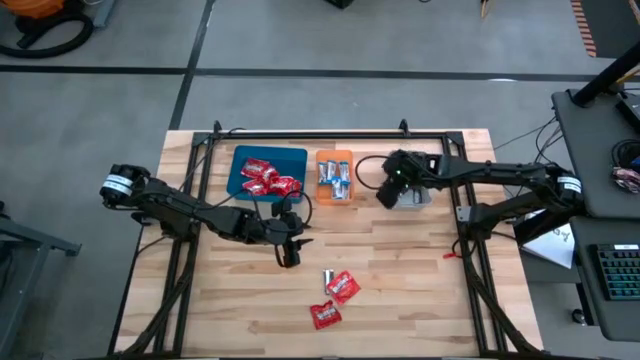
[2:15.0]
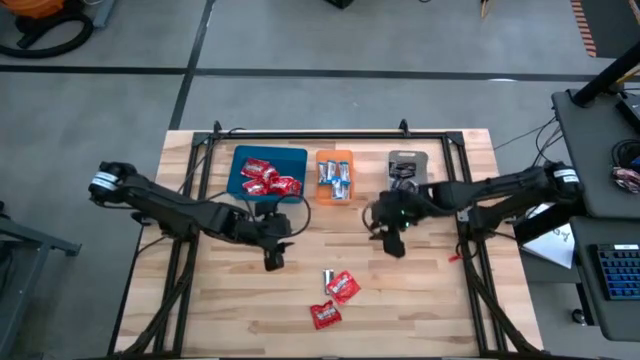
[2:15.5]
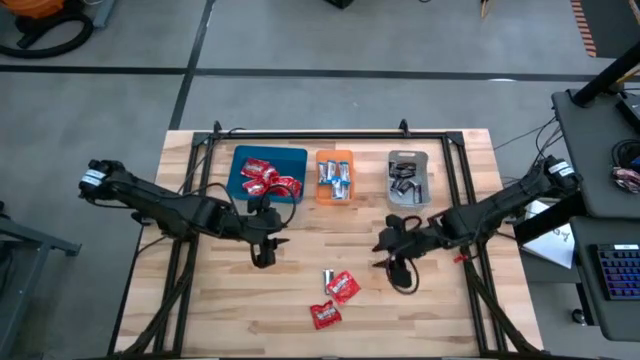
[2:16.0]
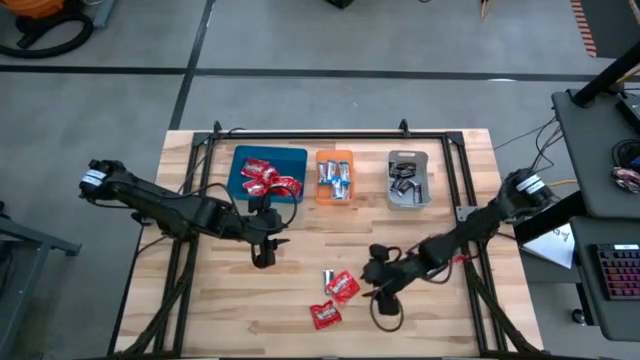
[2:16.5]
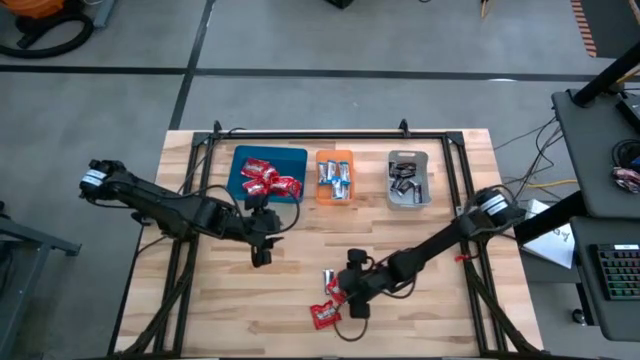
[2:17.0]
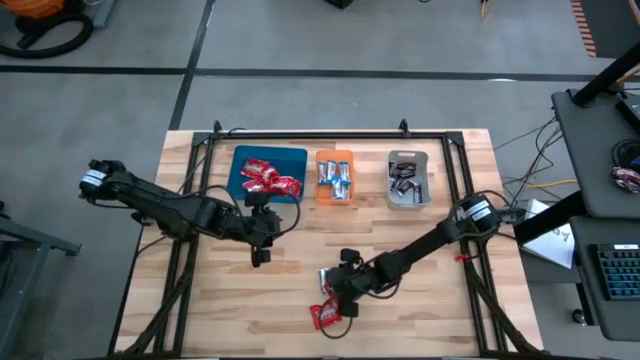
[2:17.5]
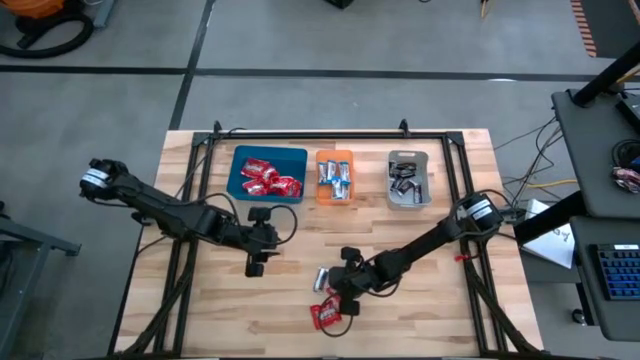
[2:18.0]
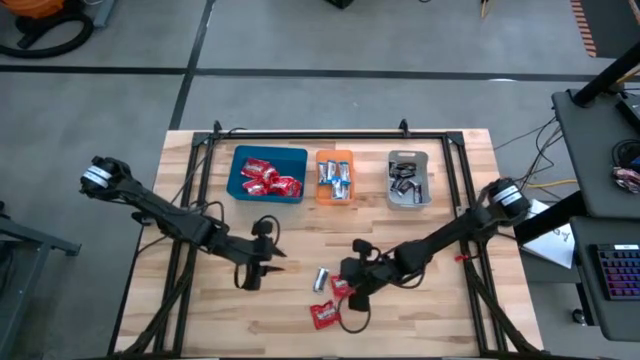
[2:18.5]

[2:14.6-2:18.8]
Task: Sort candy
Put the red candy into the blue bin

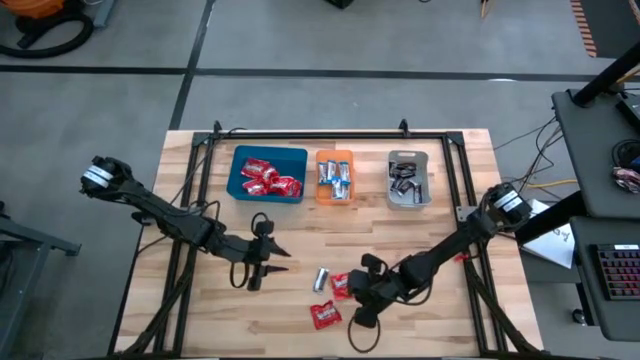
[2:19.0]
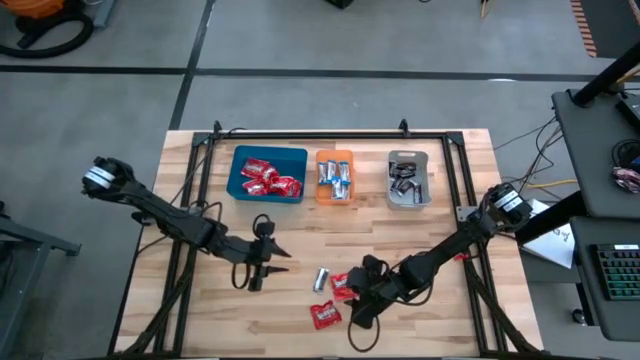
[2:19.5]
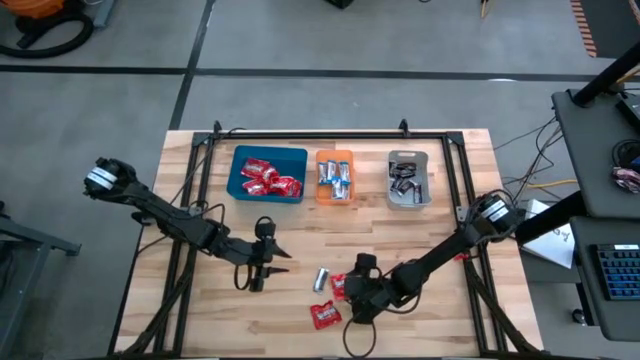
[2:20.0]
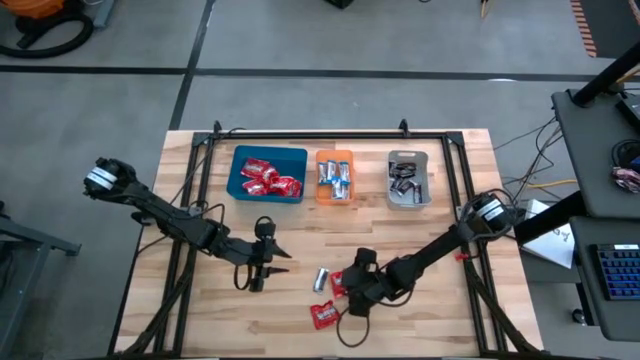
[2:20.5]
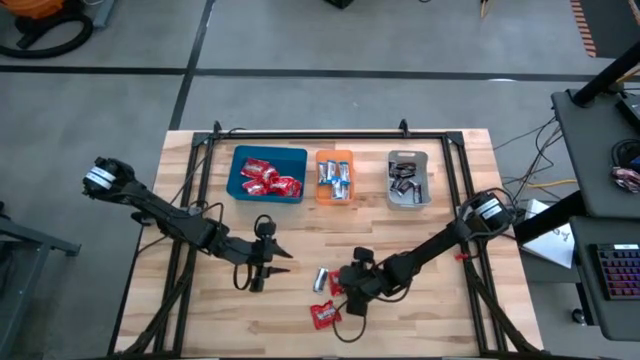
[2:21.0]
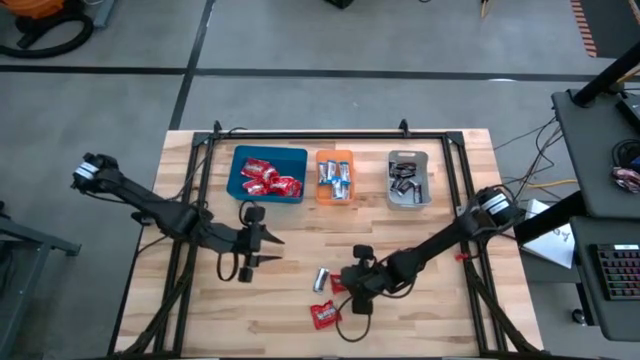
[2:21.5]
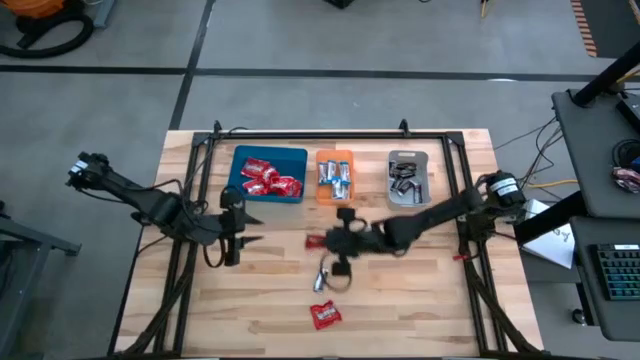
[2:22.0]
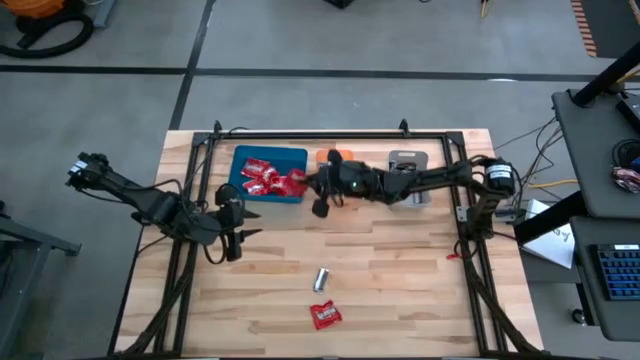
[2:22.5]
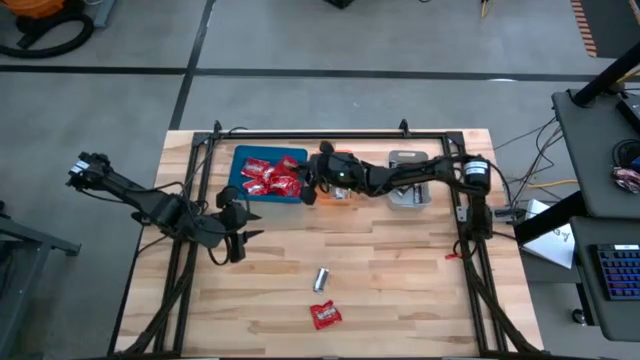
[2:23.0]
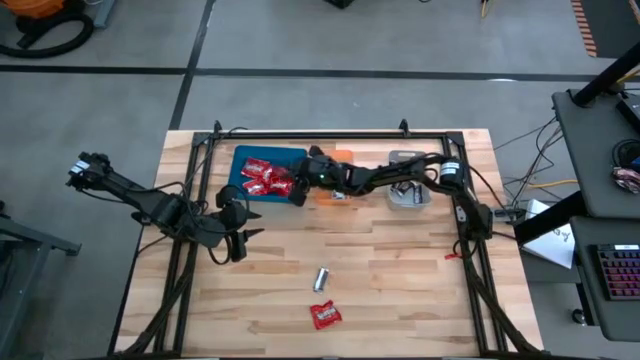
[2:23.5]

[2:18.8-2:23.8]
Put the red candy into the blue bin

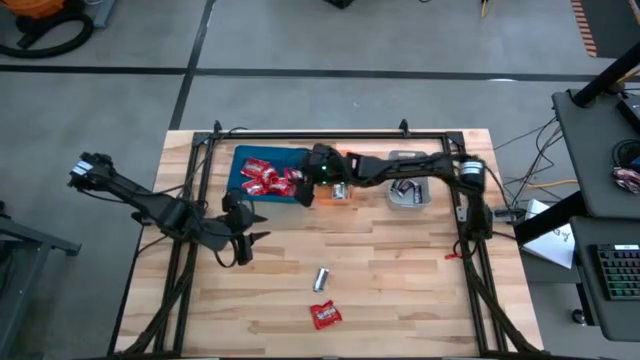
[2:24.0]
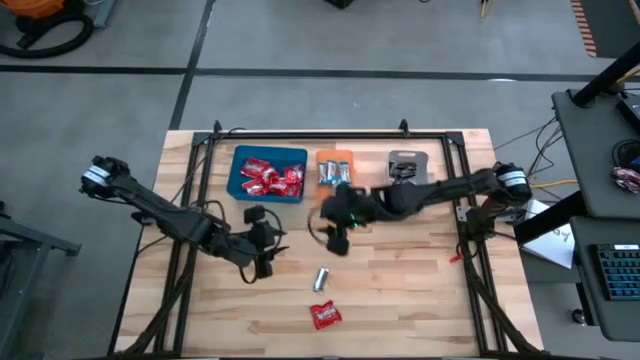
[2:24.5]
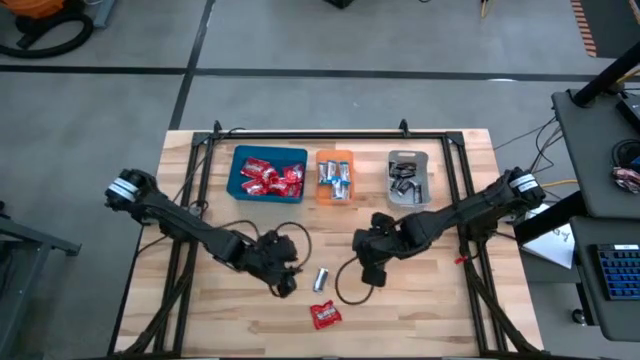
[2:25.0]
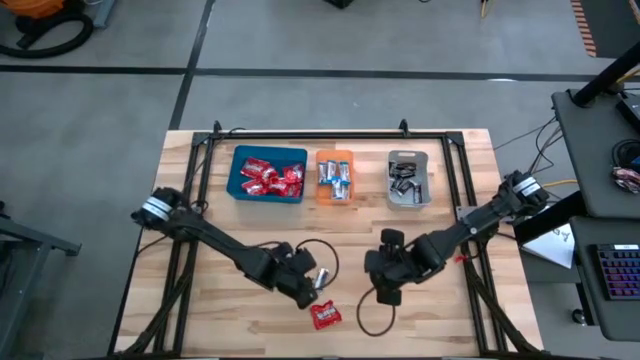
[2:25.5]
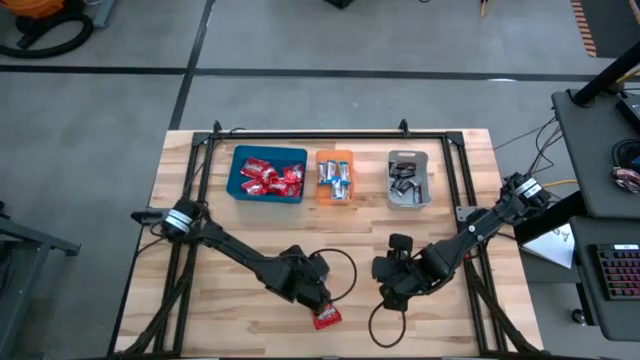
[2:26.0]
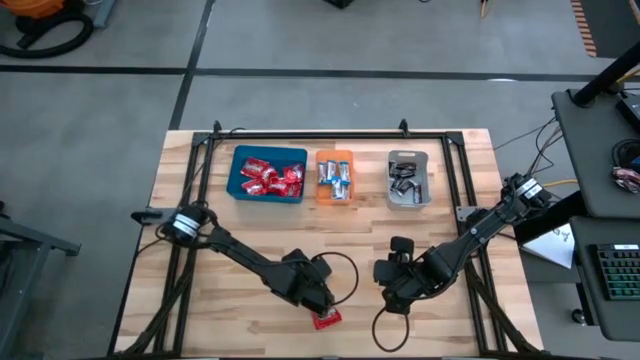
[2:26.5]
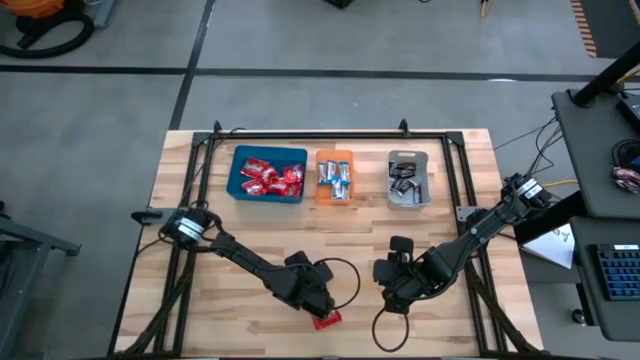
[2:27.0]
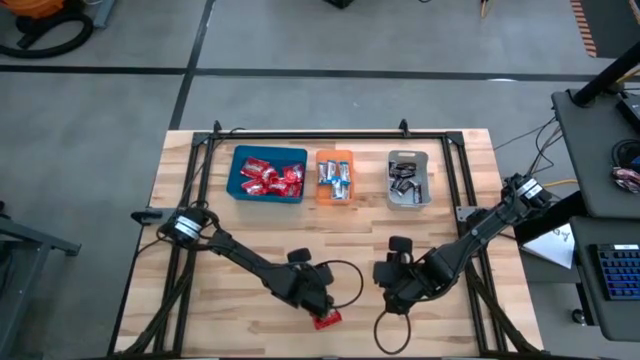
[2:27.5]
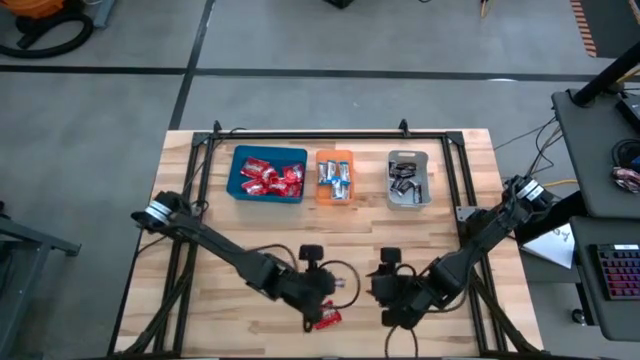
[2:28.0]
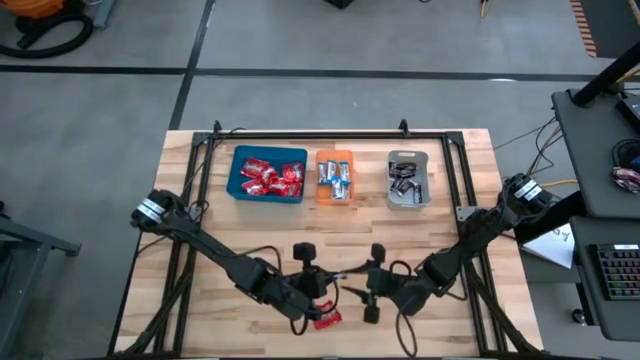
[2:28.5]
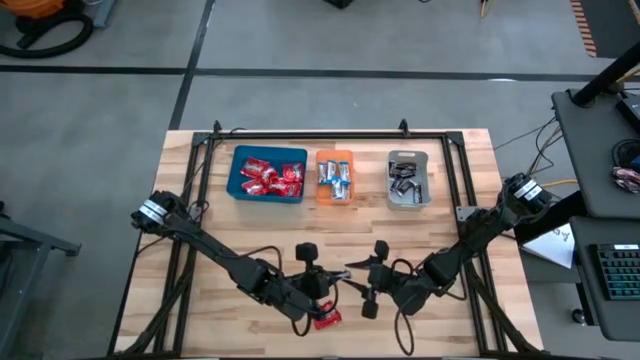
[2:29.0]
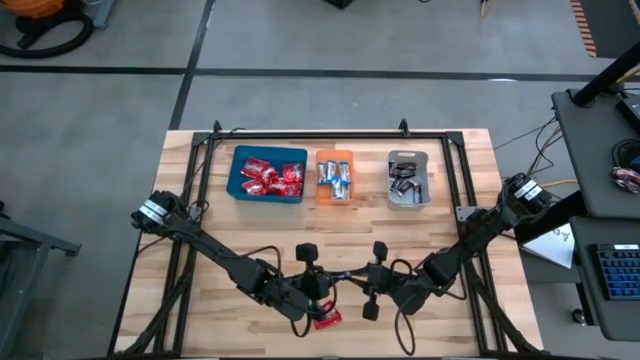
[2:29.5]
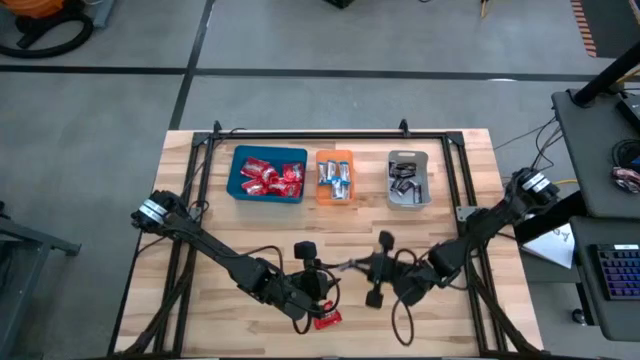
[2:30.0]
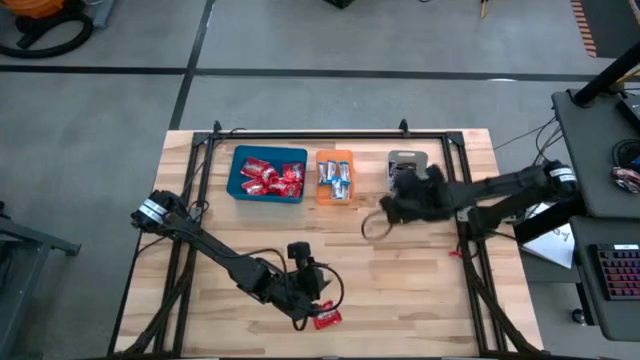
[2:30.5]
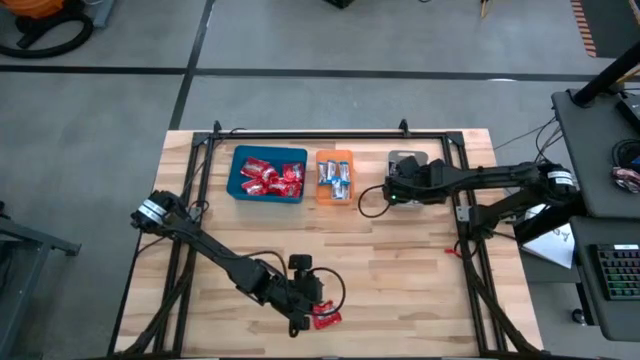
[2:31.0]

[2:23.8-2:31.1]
Put the brown chocolate bar into the gray bin

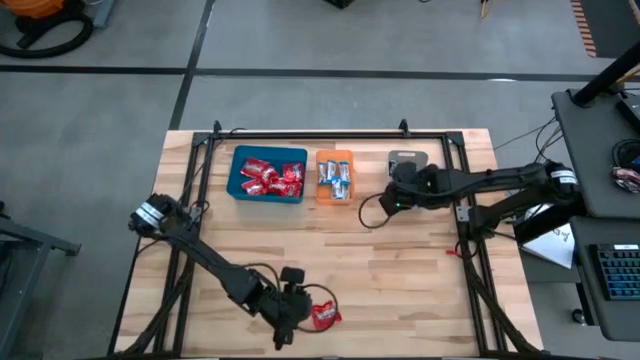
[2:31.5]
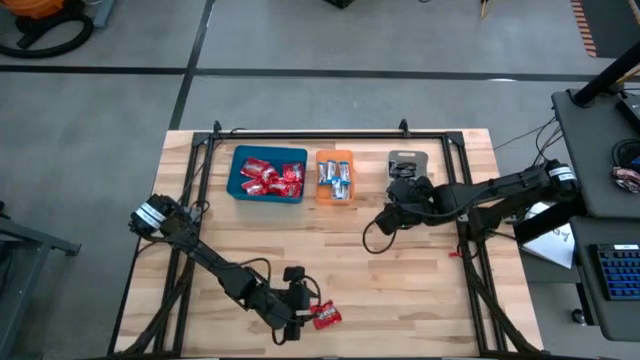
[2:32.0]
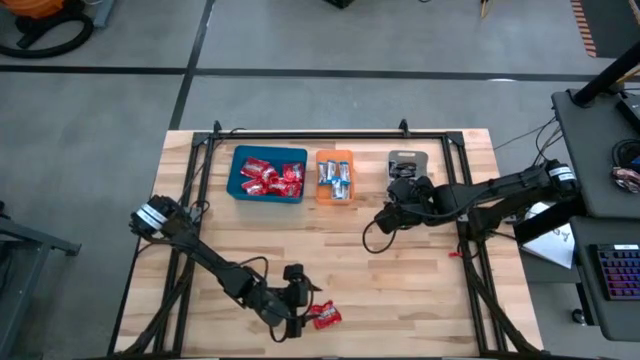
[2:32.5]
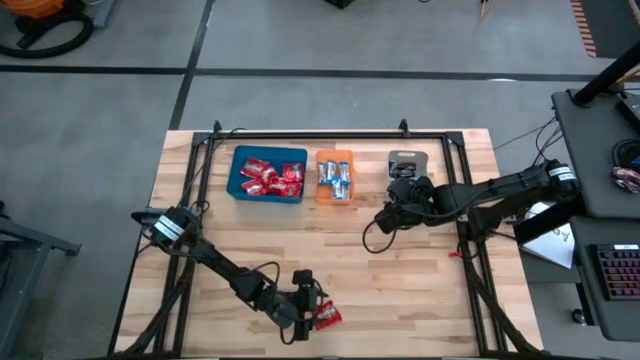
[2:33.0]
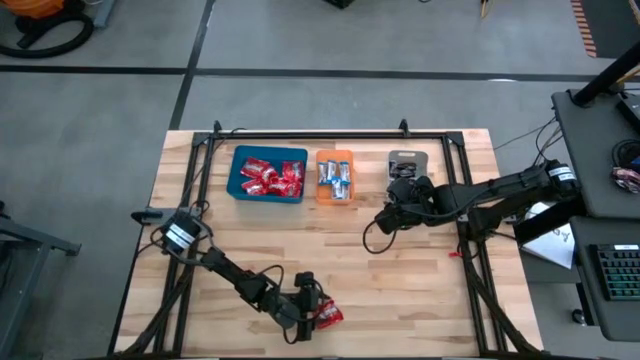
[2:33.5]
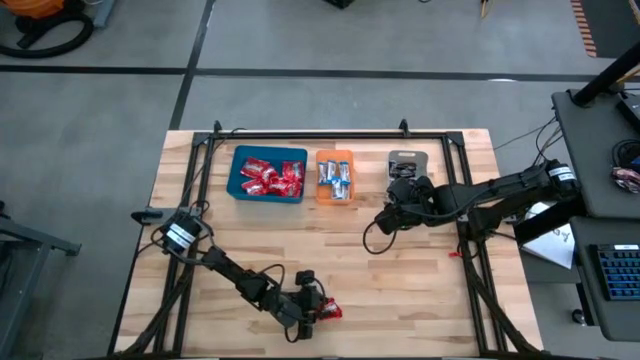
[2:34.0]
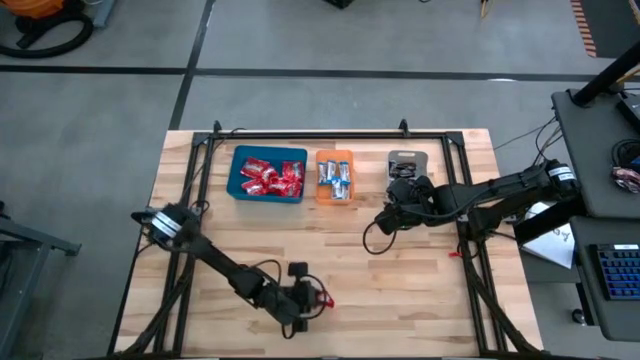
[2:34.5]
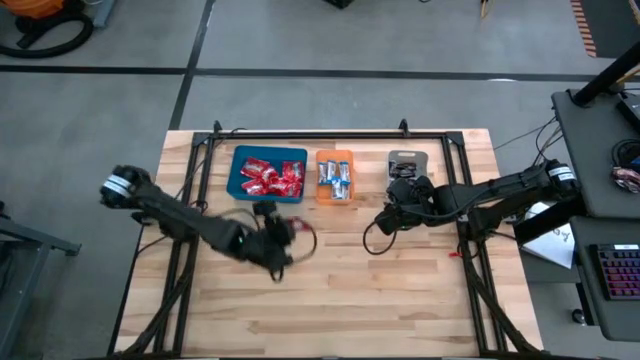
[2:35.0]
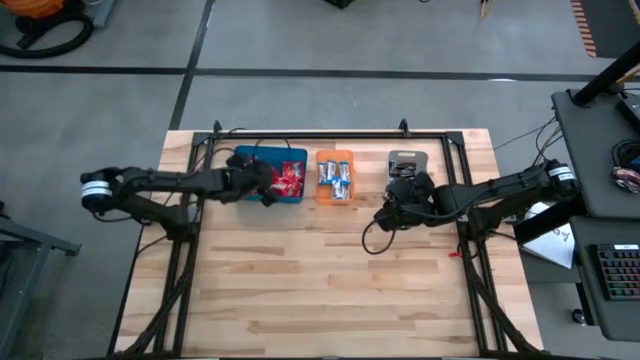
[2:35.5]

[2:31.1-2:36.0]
Put the red candy into the blue bin
